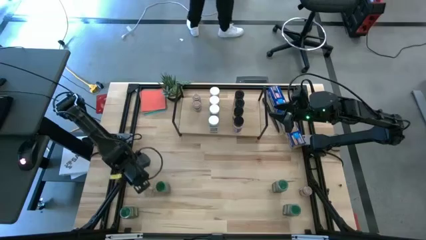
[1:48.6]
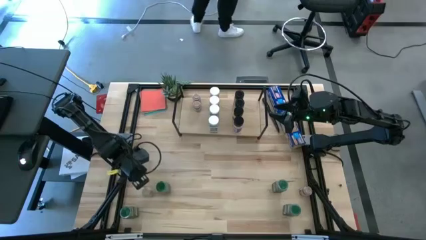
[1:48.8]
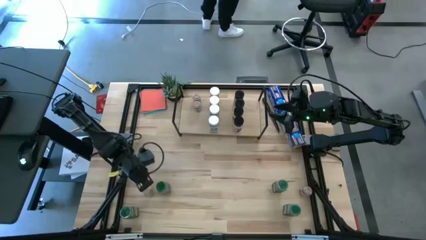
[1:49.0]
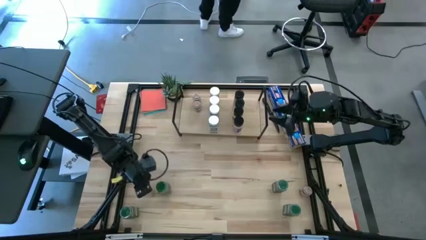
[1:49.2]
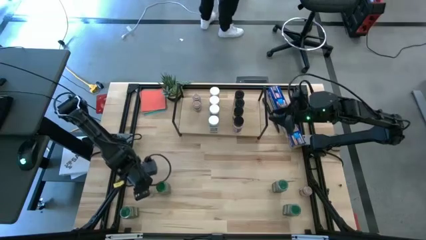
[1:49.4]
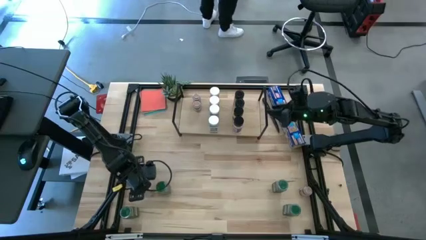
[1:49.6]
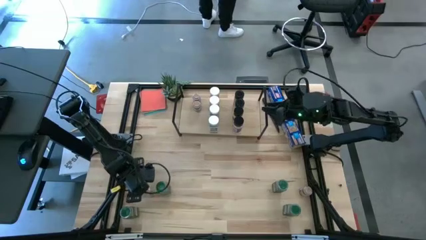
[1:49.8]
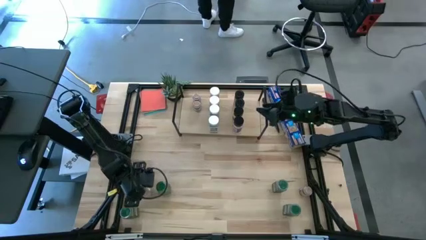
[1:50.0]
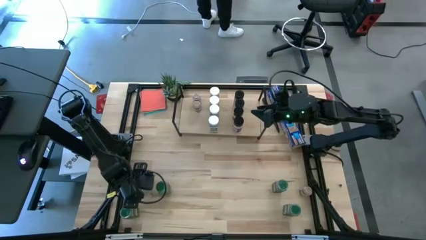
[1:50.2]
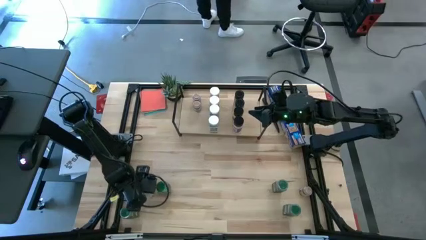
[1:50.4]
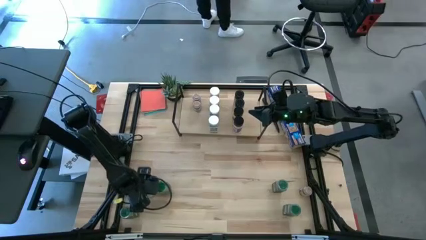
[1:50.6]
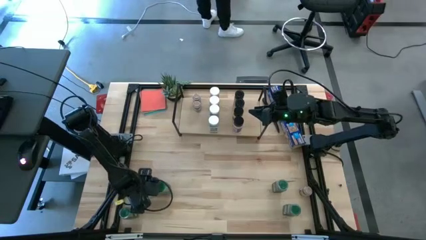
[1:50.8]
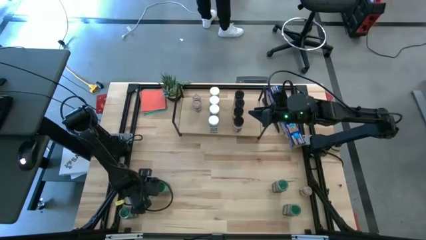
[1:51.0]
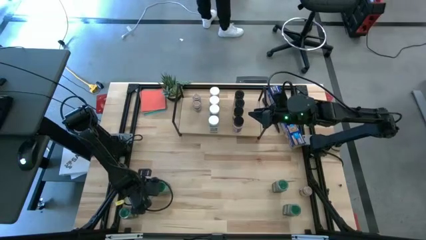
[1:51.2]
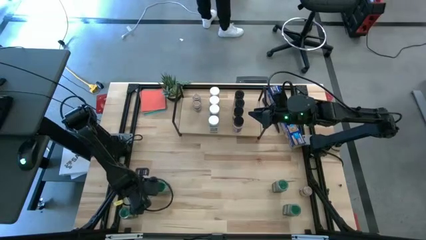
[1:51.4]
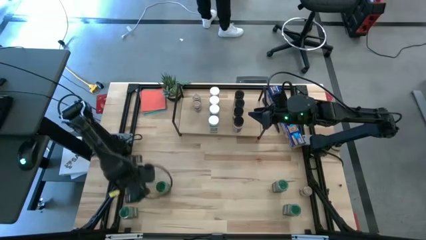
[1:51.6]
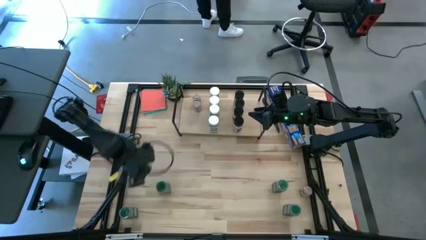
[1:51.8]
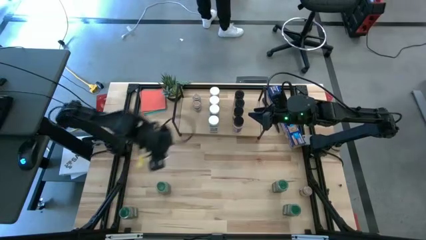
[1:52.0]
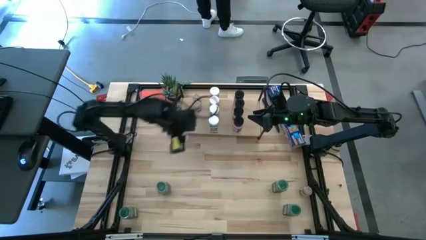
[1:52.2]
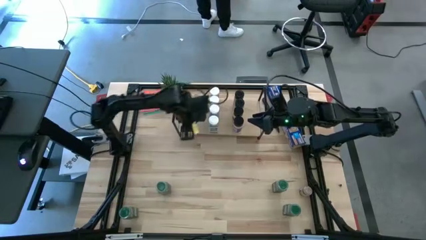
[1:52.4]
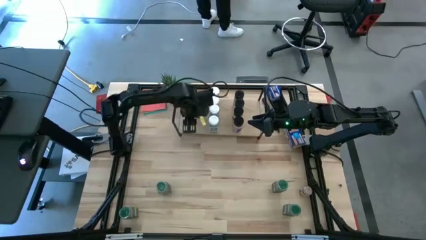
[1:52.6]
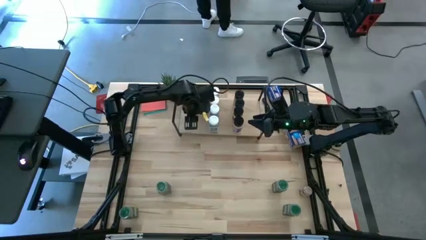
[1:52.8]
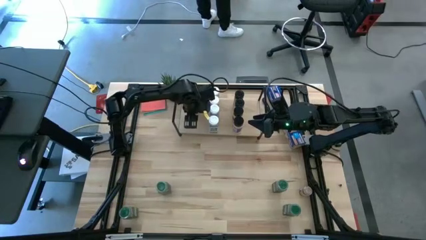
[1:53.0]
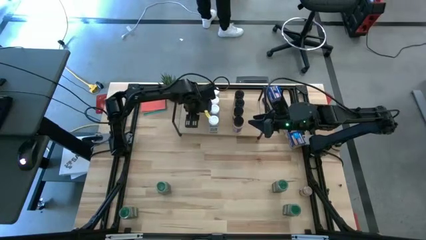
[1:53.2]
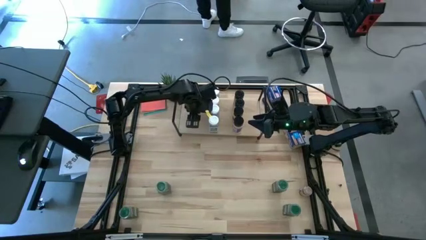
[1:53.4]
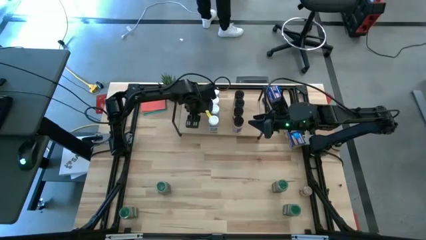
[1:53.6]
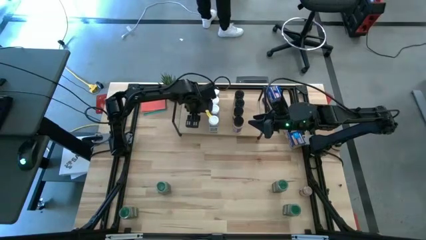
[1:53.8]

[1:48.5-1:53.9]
Task: Shelf spices
Put the brown seasoning bottle on the shelf aligned with the other brown seasoning bottles

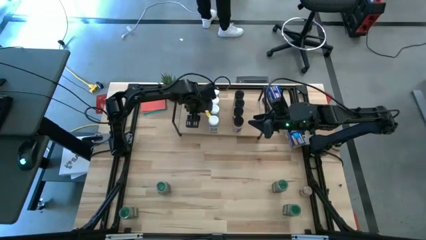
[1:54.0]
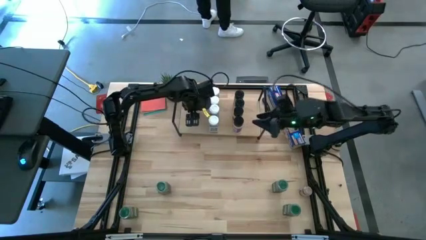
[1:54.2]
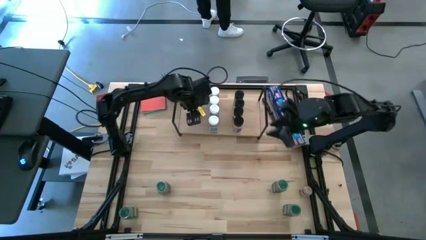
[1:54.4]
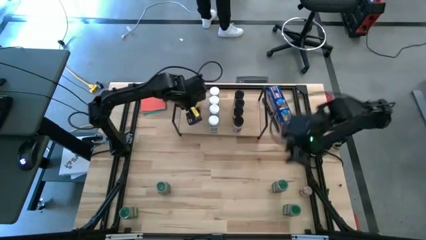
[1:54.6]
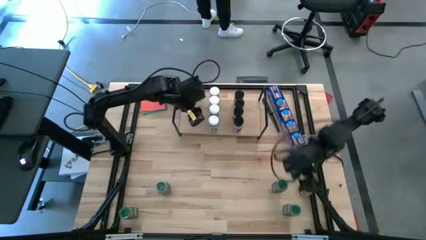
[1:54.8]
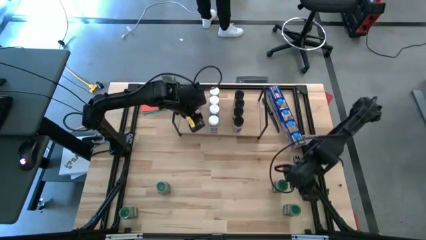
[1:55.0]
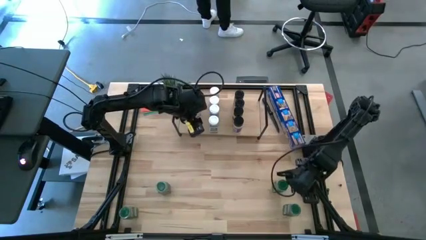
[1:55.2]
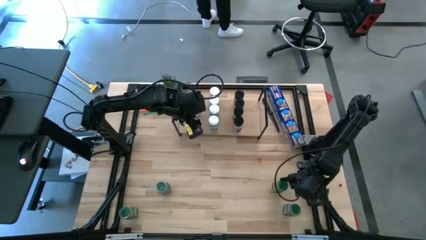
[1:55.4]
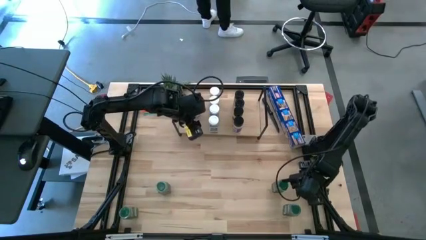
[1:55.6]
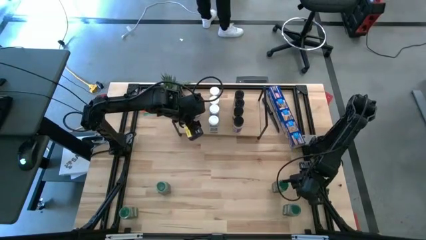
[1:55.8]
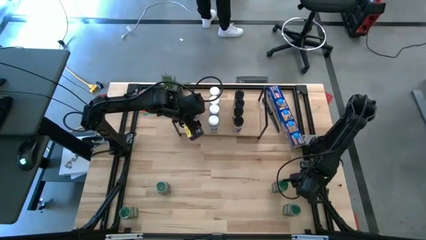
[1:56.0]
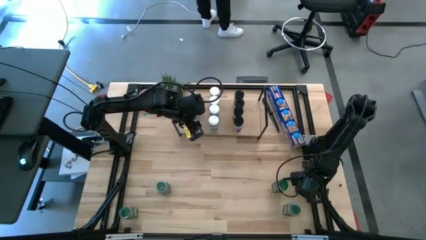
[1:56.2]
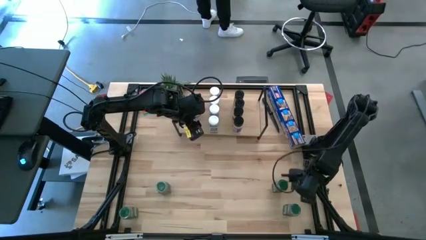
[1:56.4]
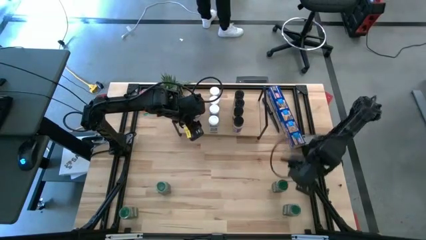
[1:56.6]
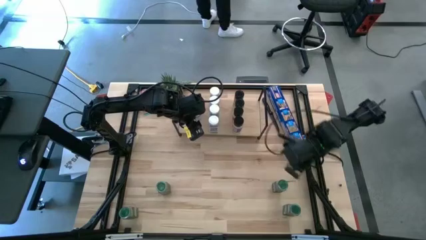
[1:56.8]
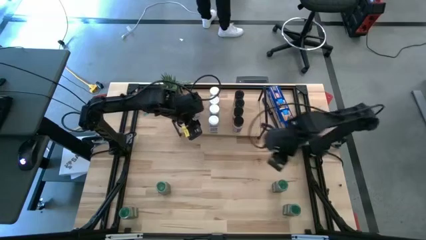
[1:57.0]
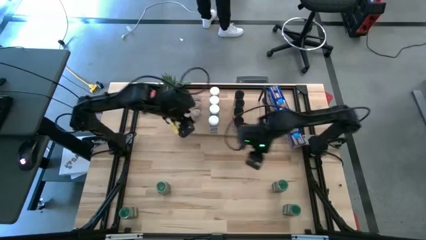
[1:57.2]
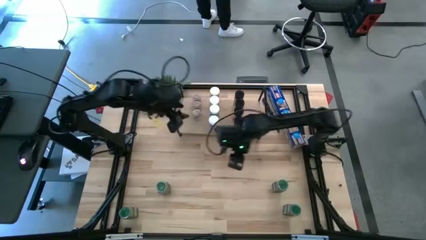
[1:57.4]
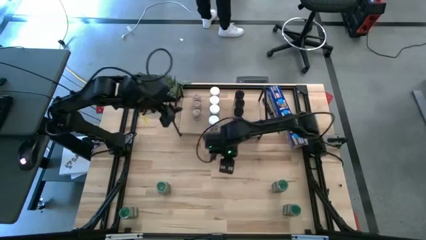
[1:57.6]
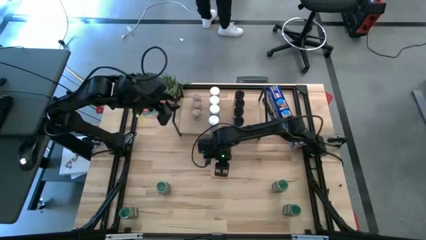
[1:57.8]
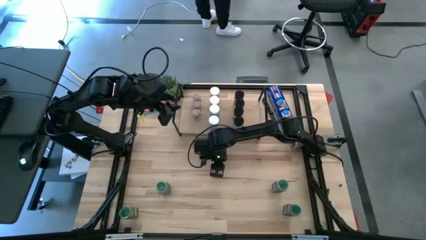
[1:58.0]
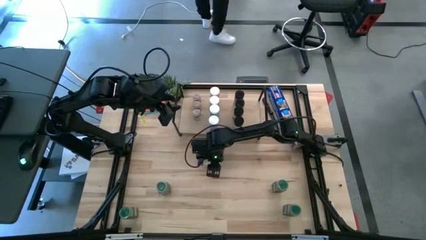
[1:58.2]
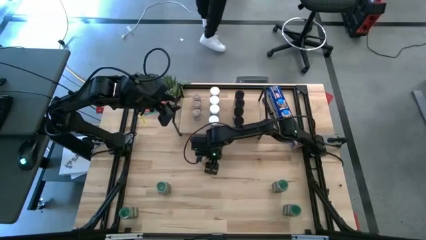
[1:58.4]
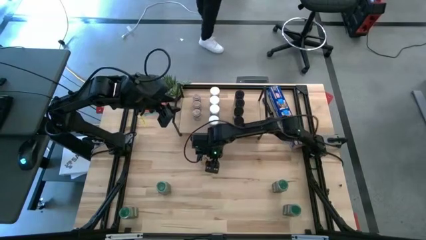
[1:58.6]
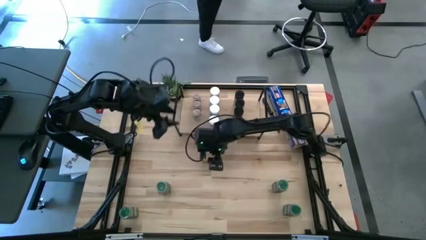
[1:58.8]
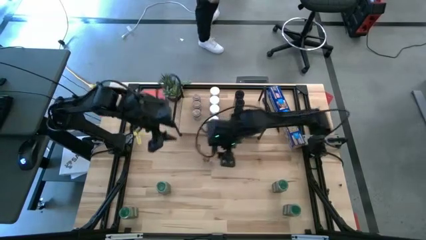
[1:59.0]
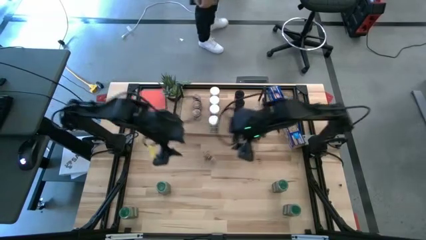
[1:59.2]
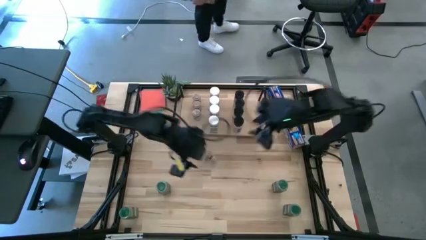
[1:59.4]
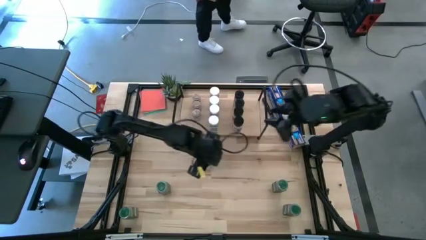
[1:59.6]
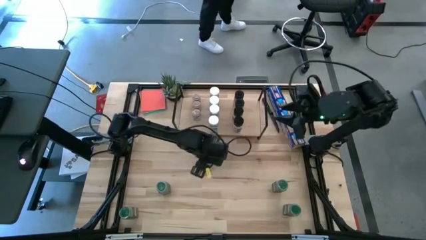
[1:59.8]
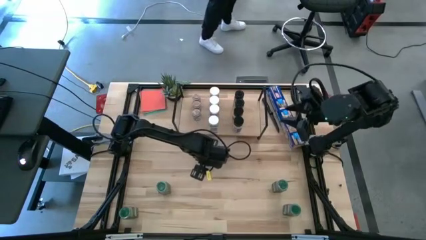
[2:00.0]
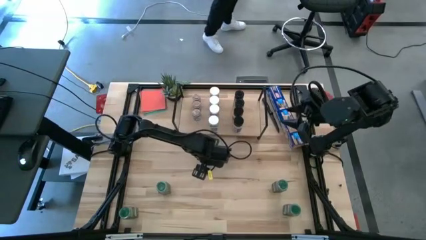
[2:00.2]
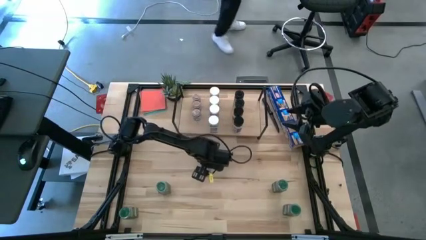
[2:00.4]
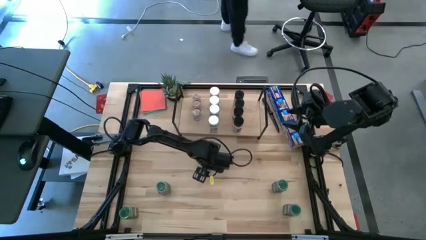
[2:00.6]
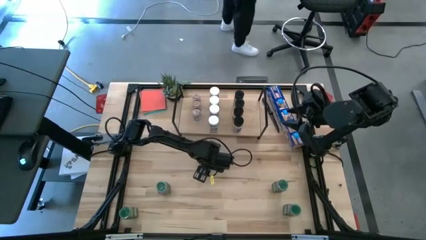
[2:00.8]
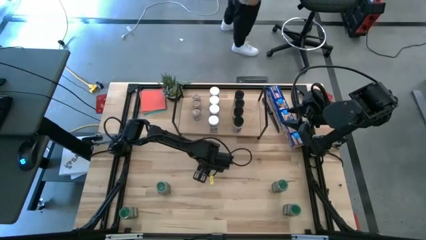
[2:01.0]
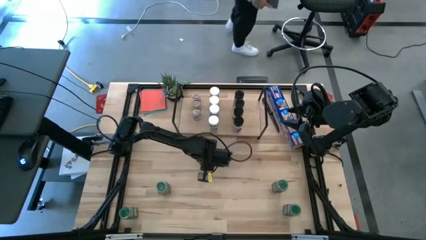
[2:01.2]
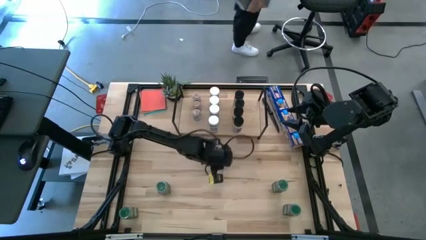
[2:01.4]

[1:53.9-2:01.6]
Put the brown seasoning bottle on the shelf aligned with the other brown seasoning bottles

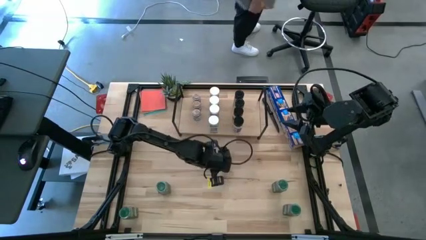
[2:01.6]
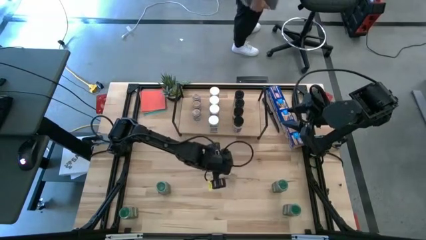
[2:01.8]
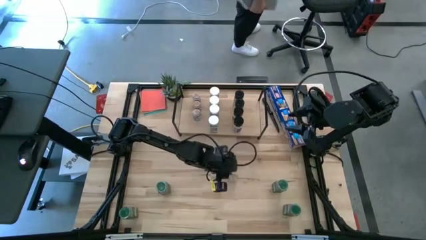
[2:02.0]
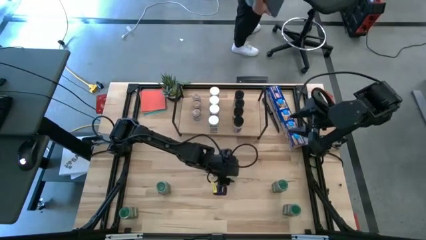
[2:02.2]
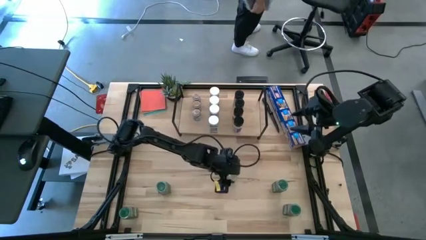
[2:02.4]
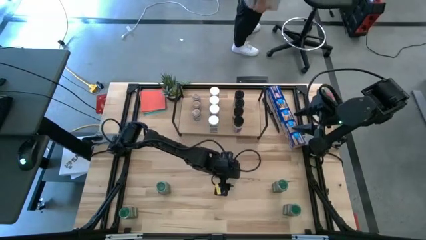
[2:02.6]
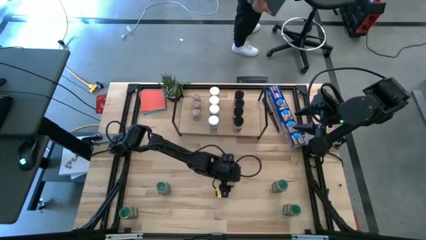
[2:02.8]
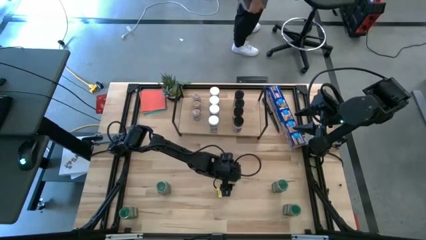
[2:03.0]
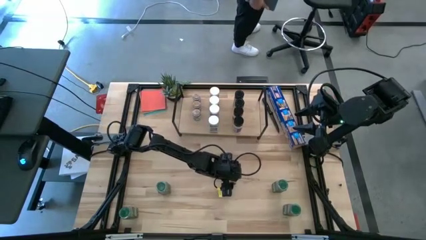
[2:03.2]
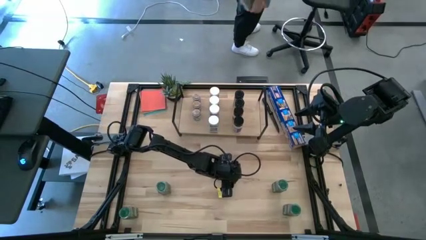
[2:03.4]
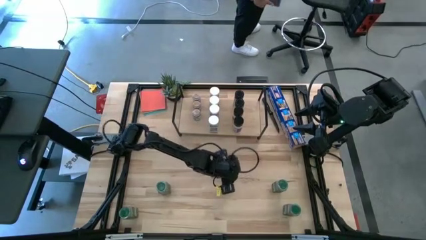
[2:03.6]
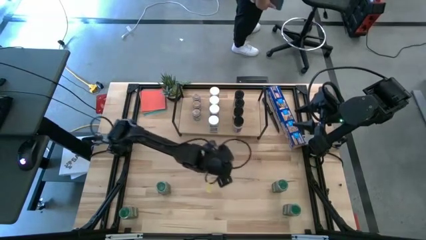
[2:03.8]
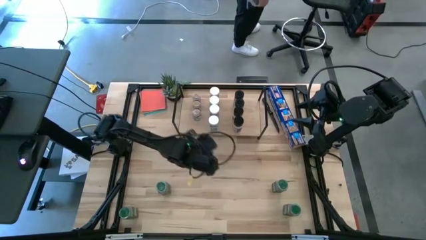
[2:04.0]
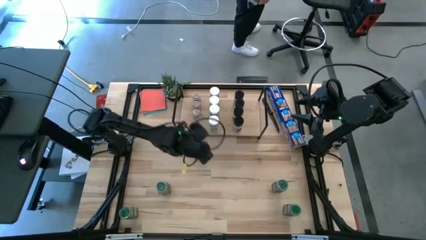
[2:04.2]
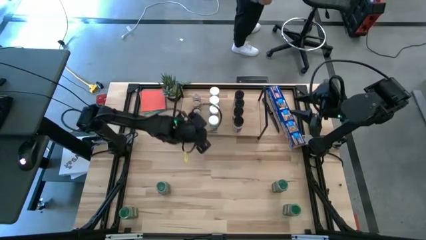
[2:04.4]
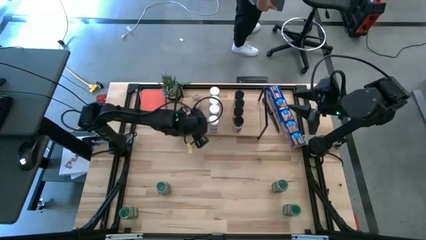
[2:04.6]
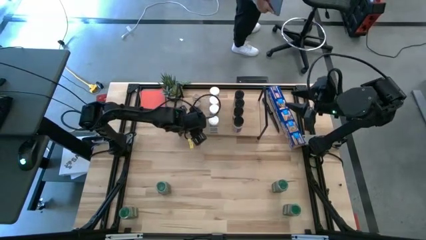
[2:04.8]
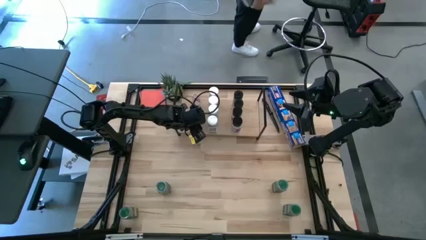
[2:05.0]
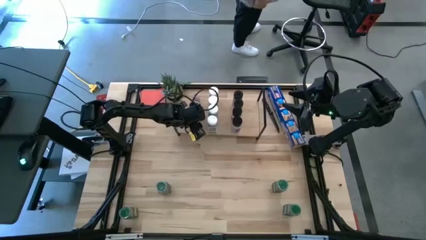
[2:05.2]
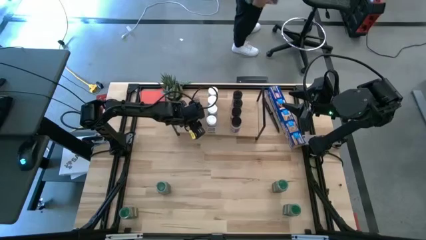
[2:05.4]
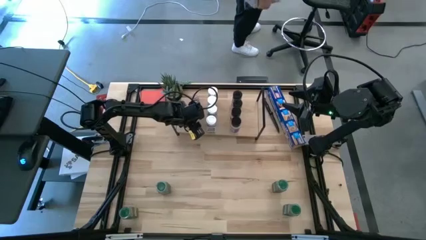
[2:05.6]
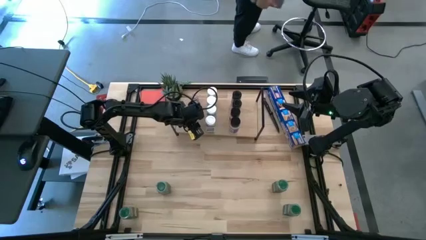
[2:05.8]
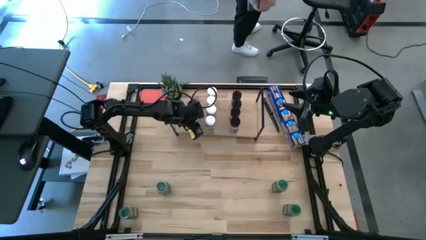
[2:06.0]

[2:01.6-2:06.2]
Put the brown seasoning bottle on the shelf aligned with the other brown seasoning bottles
